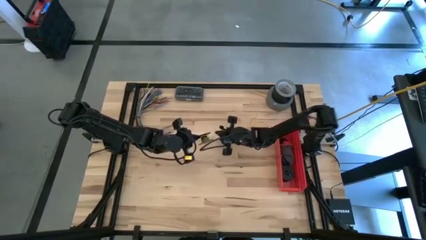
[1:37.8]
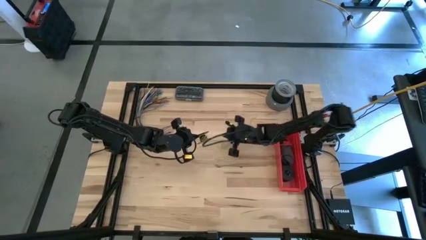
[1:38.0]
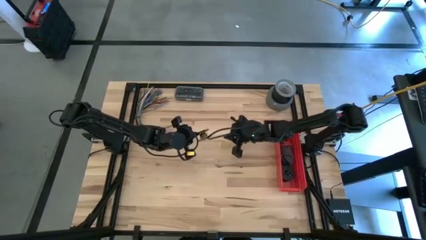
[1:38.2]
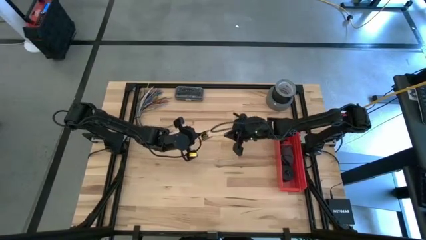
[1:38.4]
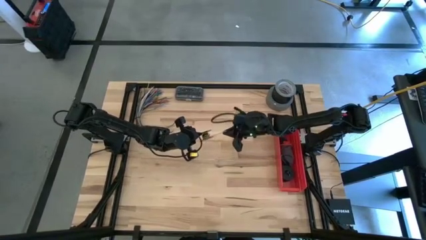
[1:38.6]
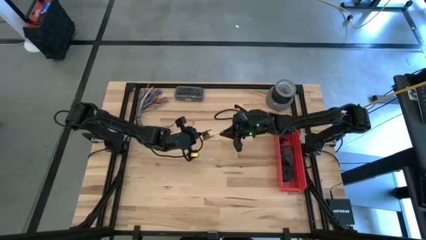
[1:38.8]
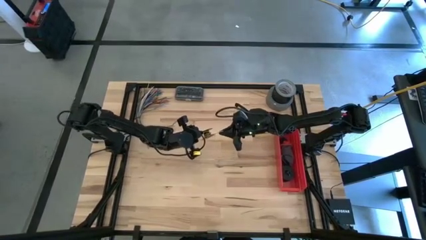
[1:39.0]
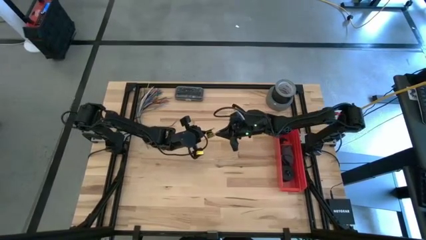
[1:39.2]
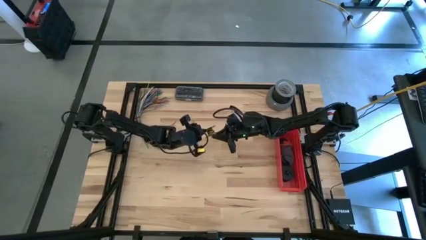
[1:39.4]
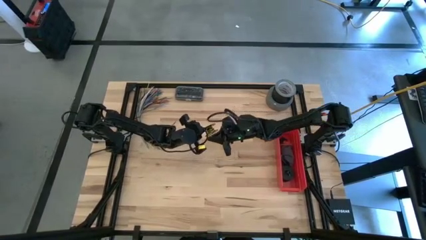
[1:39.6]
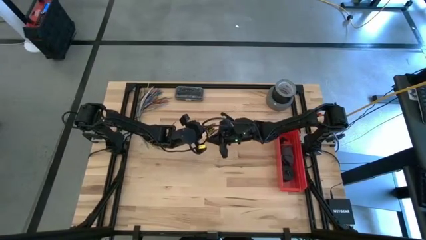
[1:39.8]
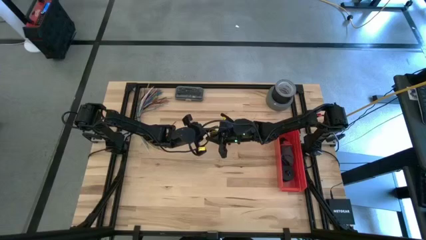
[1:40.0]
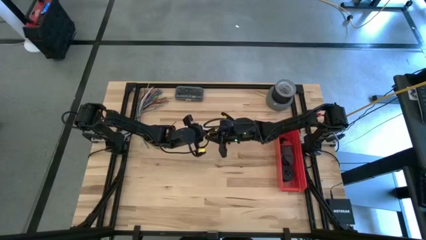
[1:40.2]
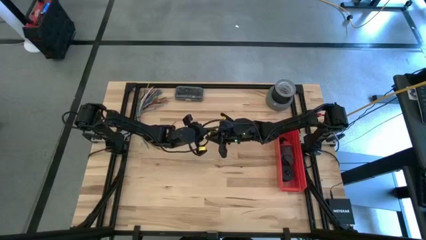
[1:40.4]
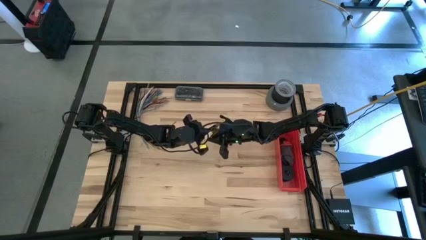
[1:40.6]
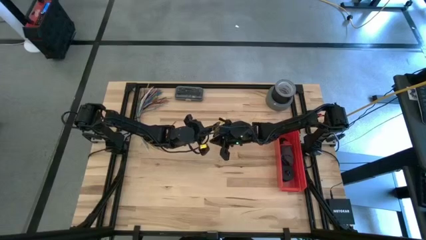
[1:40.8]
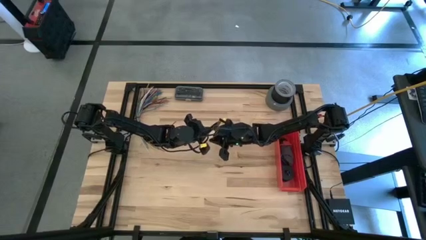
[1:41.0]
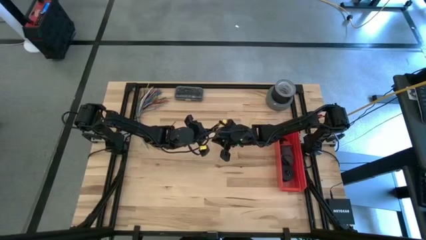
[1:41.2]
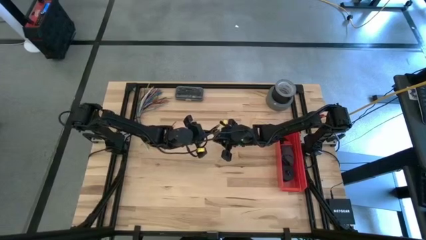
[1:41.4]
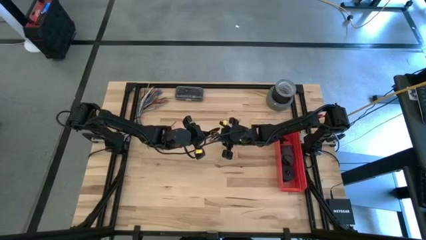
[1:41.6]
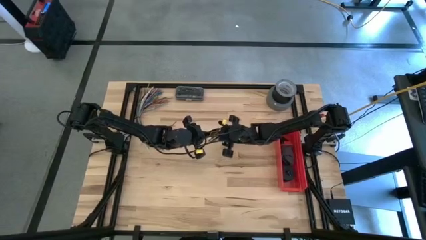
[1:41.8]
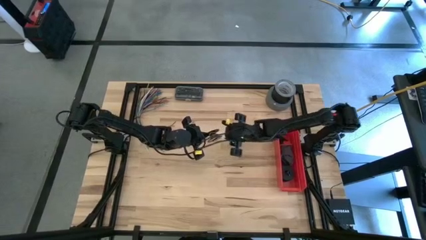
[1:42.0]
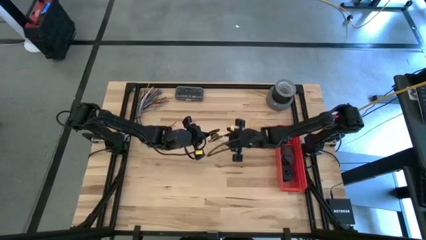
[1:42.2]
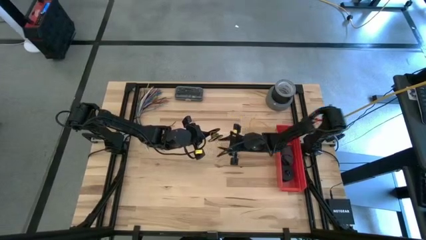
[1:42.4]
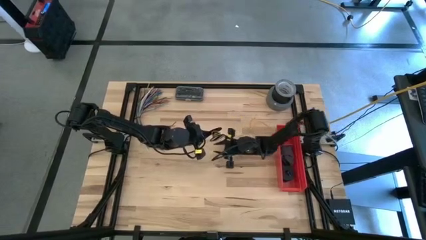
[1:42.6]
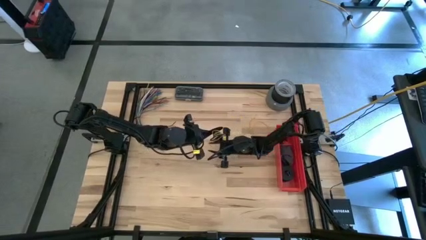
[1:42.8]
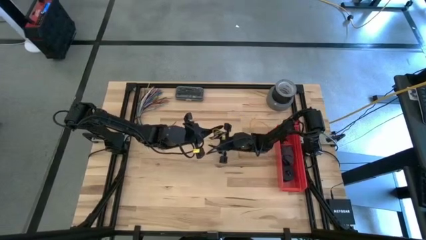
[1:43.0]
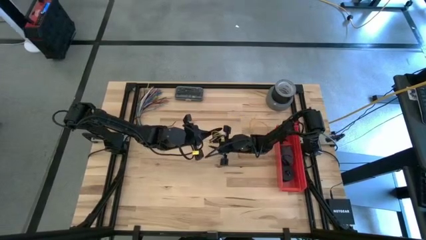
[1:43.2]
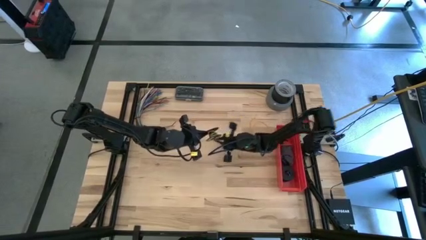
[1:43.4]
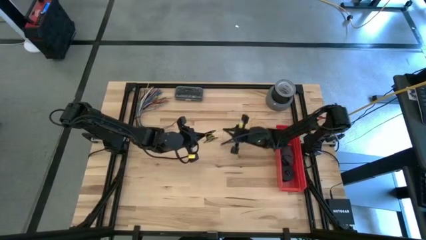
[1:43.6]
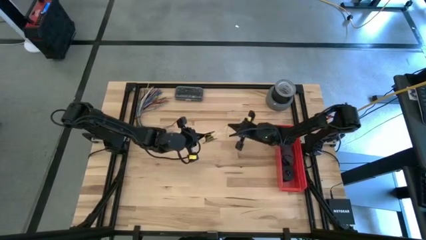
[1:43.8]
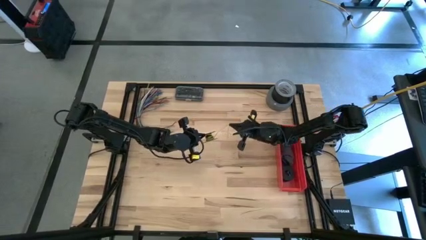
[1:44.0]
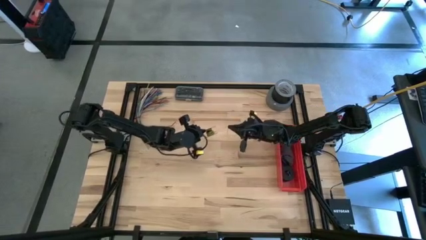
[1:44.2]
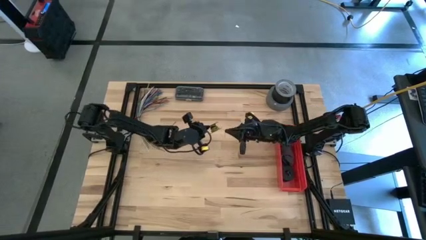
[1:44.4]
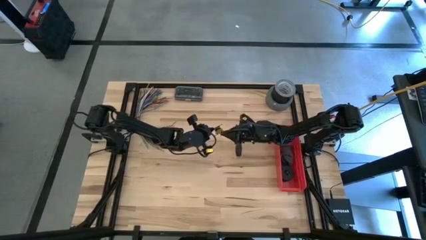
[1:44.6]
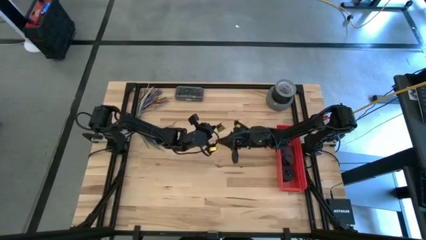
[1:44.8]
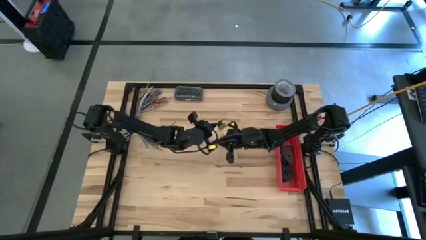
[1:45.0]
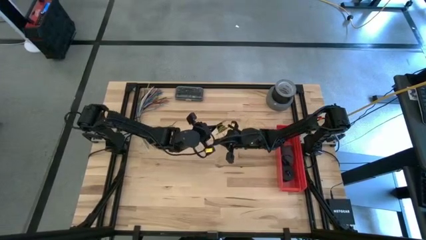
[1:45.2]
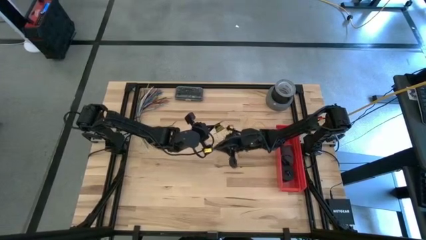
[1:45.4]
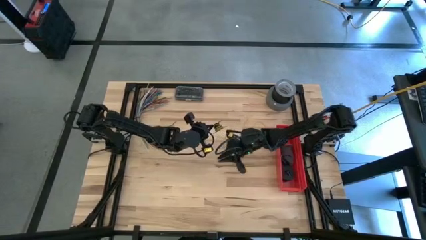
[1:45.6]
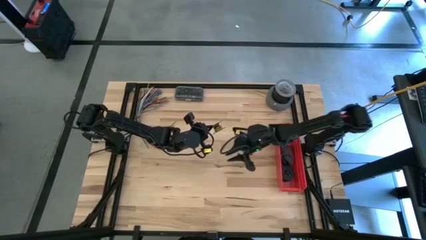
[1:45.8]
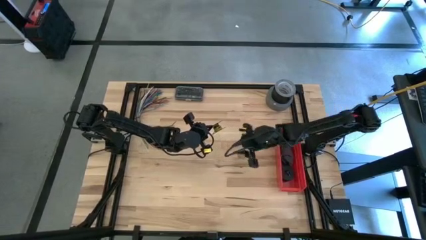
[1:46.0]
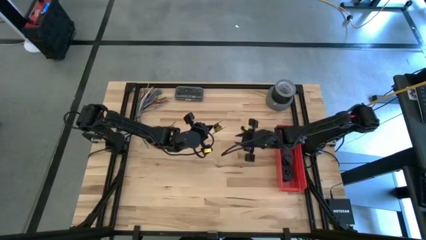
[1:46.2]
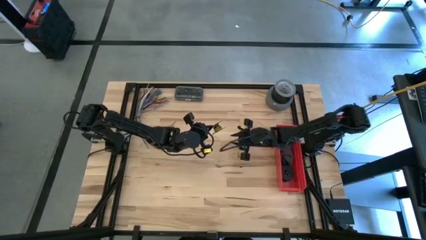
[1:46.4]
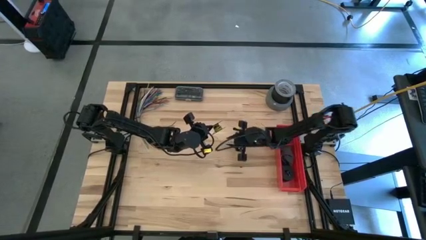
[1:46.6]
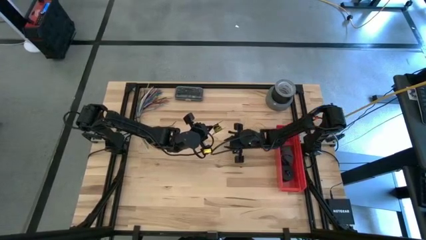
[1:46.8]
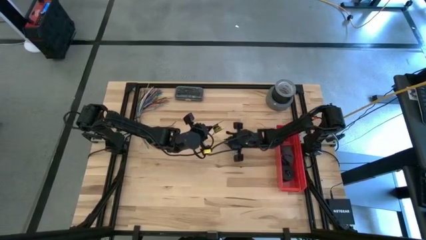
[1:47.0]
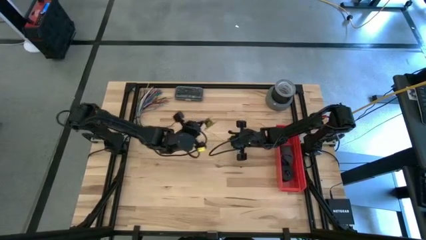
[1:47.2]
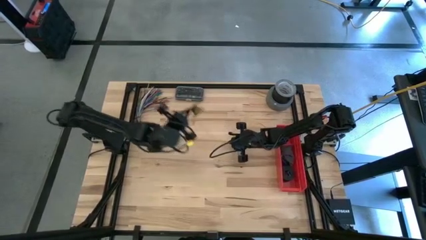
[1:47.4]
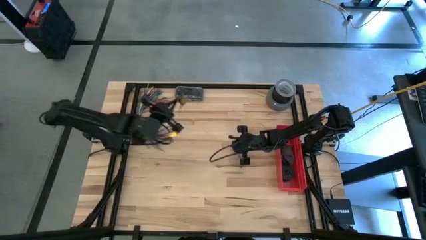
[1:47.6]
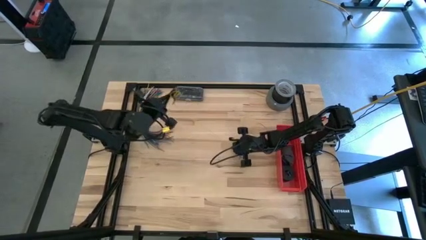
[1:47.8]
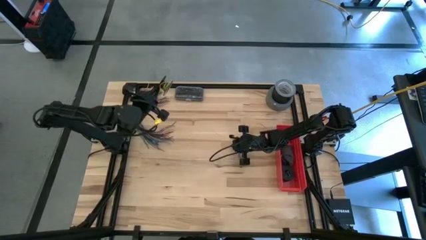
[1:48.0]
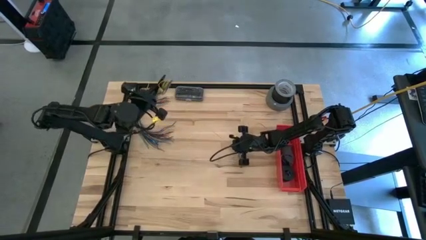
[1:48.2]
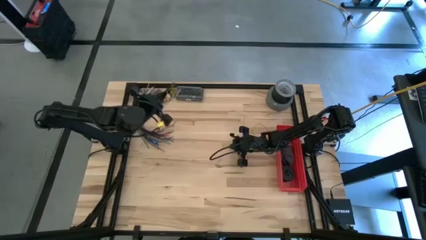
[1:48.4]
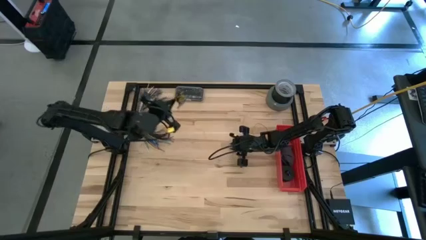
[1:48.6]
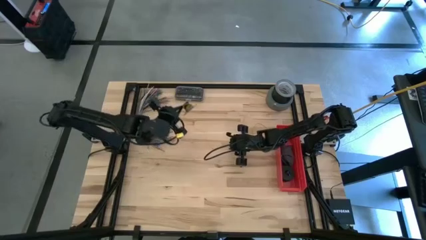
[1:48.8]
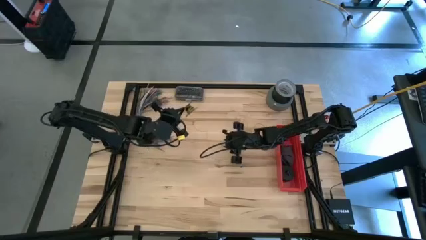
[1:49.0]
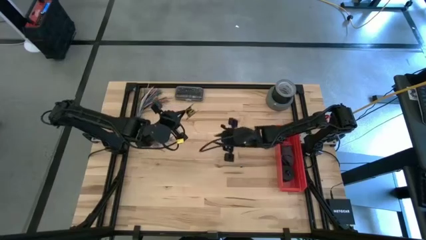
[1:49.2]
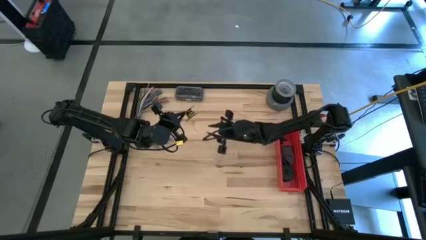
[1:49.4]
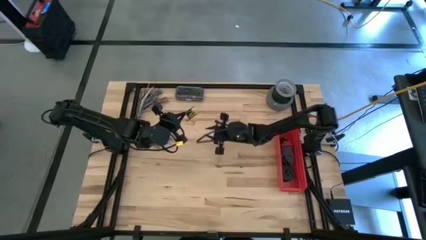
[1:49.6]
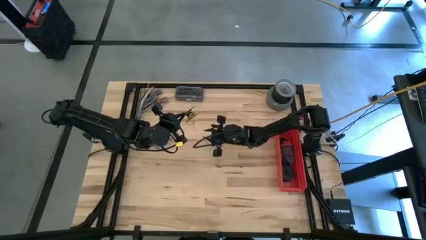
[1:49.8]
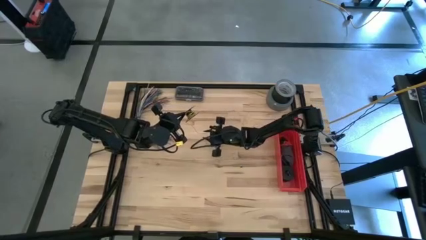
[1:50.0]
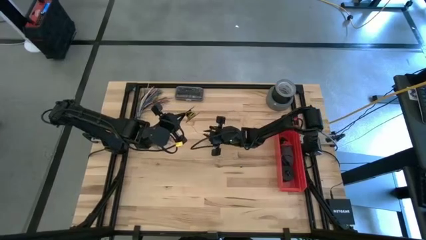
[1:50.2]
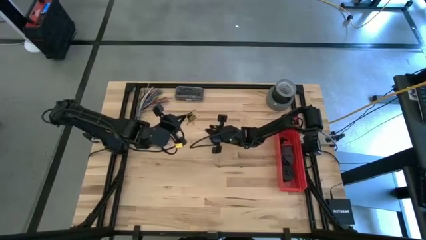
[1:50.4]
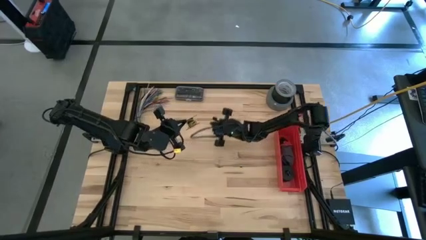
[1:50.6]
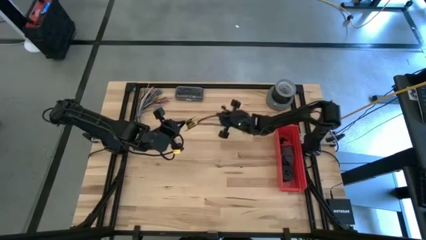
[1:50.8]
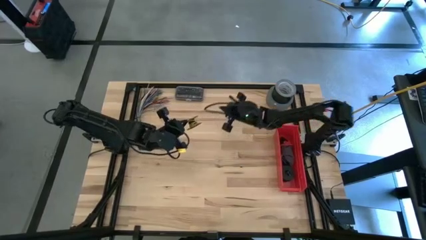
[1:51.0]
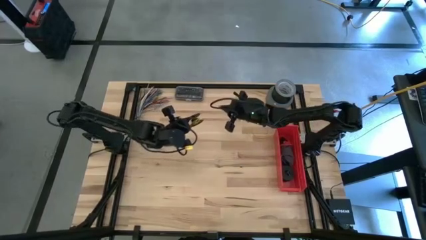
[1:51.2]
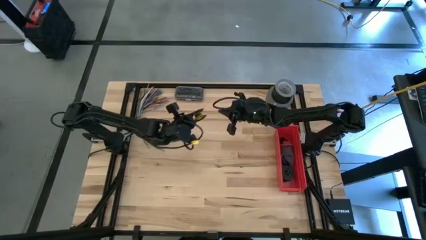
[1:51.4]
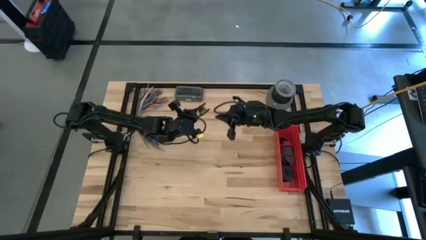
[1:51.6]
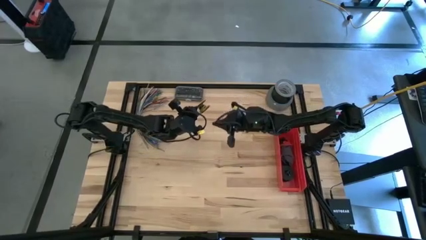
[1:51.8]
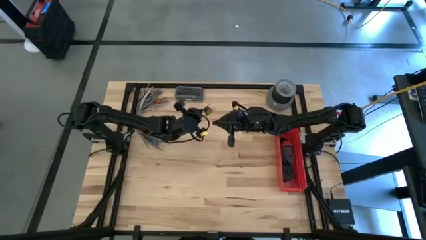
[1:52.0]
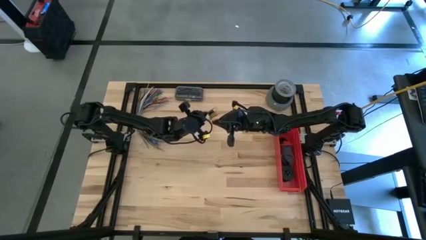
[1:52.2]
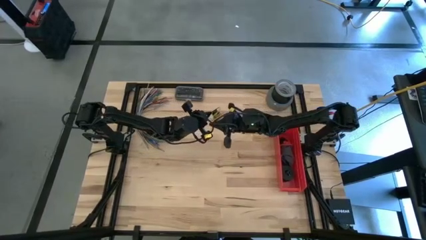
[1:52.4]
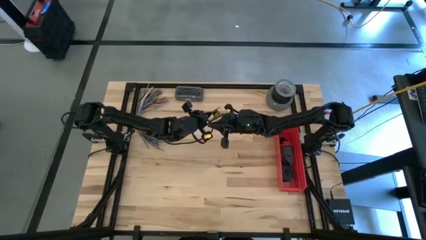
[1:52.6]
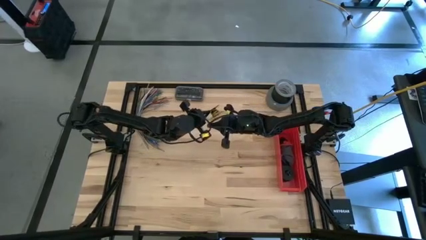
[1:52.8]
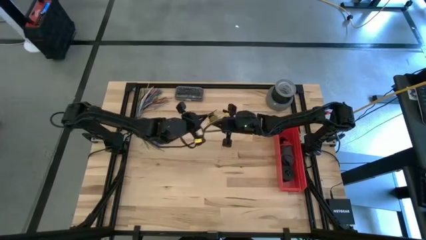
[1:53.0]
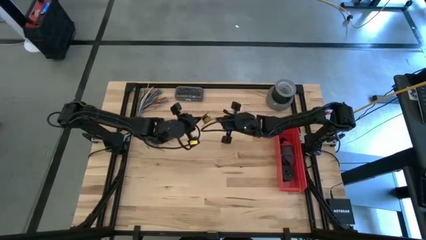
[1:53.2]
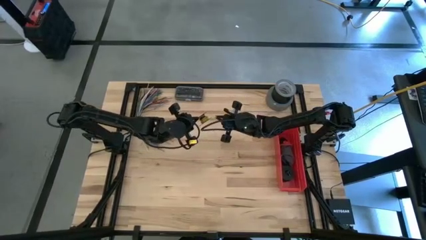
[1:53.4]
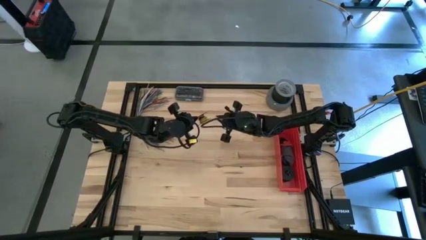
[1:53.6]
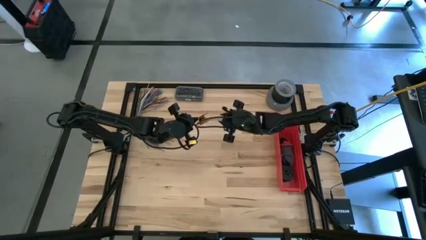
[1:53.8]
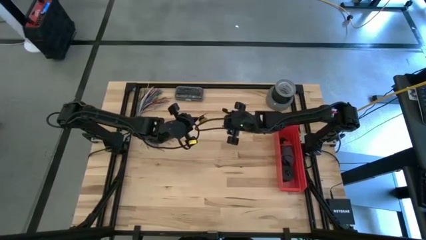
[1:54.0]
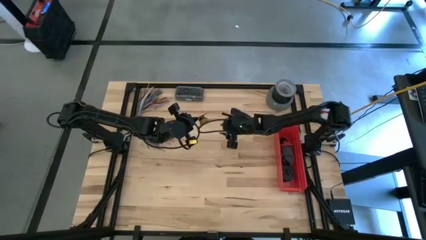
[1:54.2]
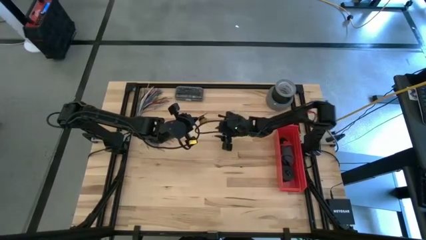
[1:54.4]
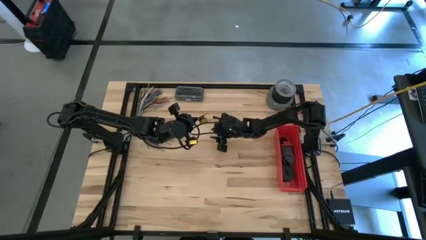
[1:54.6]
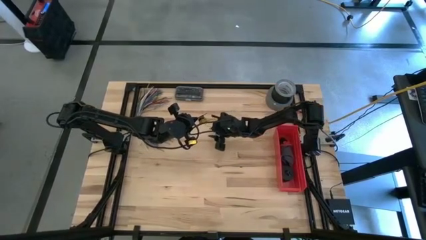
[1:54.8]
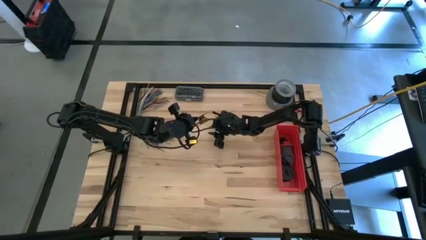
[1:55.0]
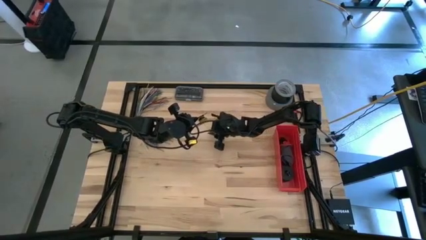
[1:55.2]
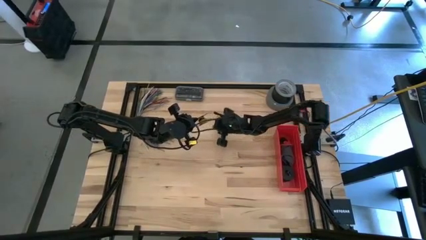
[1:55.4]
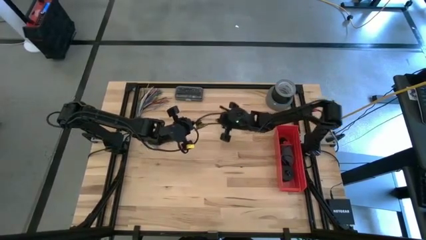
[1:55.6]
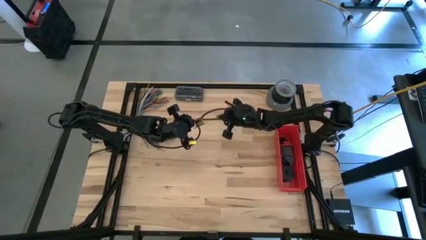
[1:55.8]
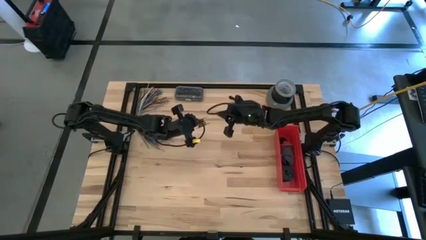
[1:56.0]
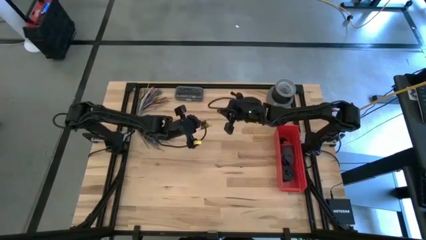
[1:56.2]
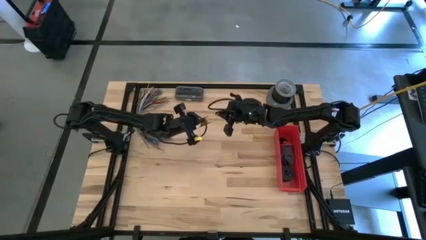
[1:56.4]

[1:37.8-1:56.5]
Task: Coil cords
Coil the yellow wire onto the black spool
